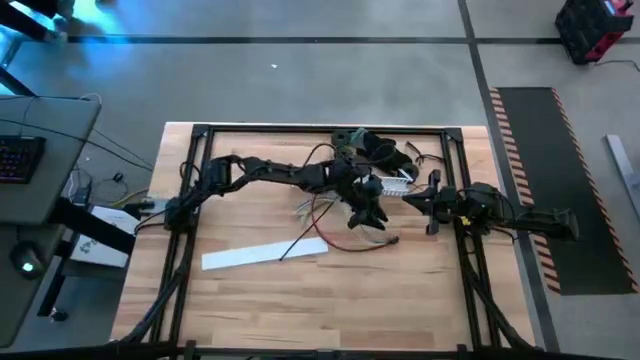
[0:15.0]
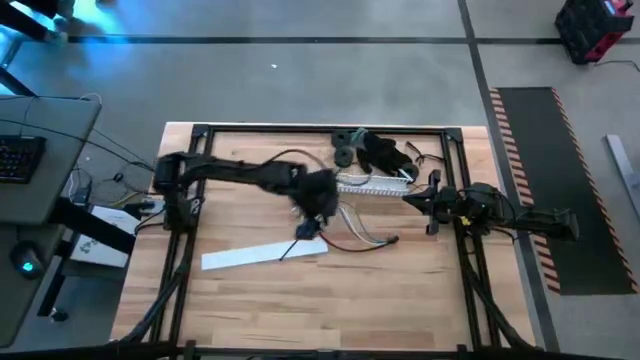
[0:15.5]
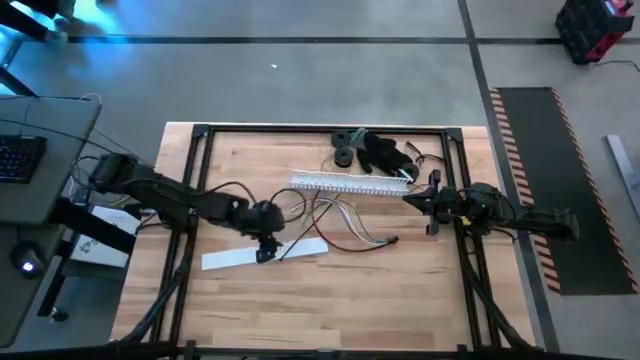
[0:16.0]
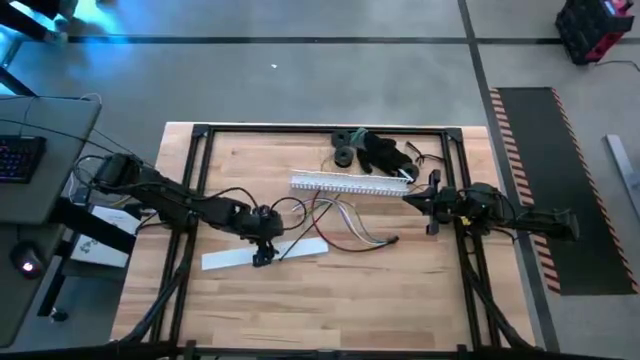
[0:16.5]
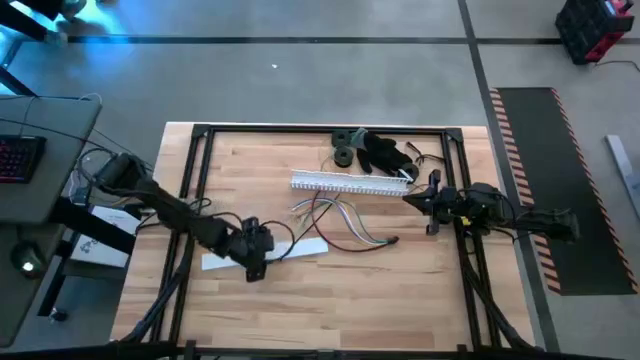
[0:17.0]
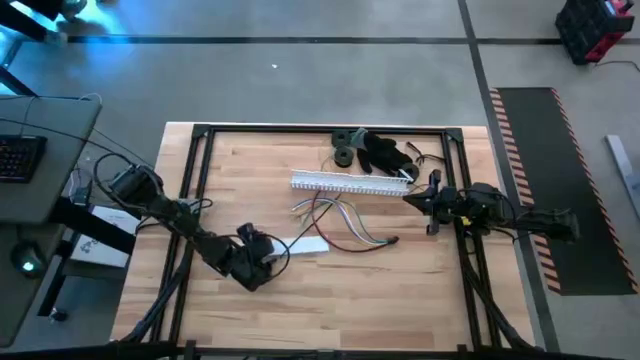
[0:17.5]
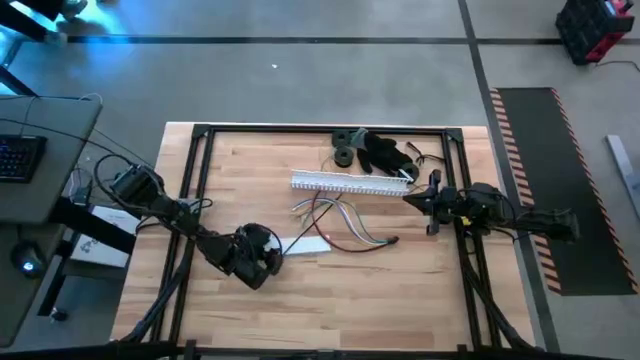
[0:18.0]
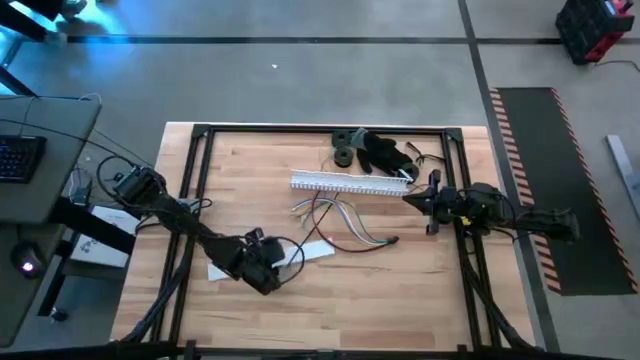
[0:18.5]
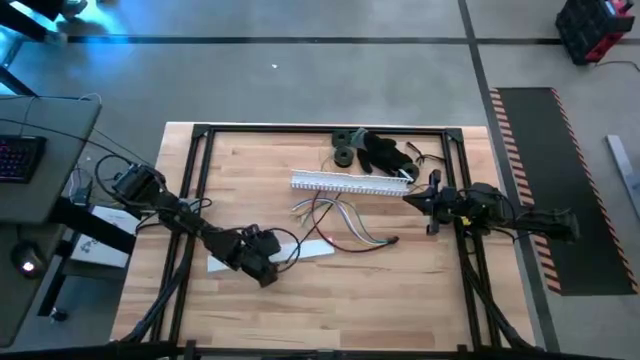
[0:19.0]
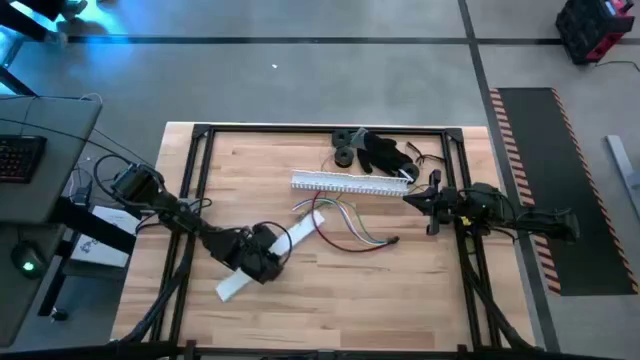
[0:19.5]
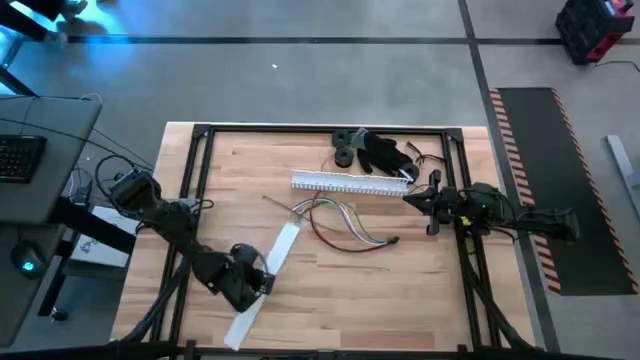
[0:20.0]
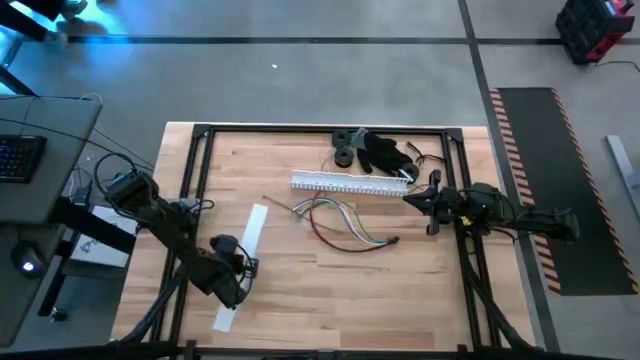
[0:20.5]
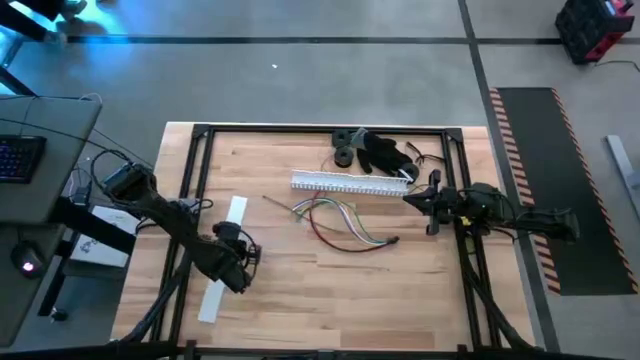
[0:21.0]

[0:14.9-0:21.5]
Task: Ziptie cables
Adjust the cable duct cap

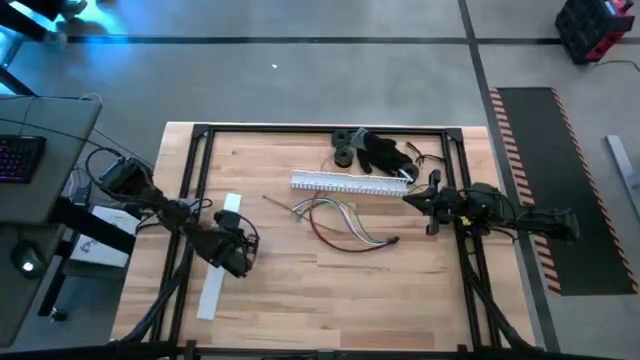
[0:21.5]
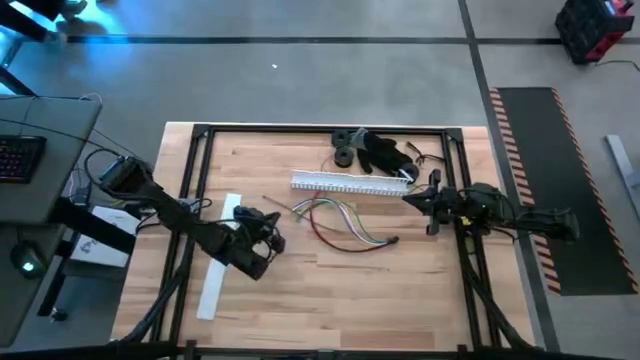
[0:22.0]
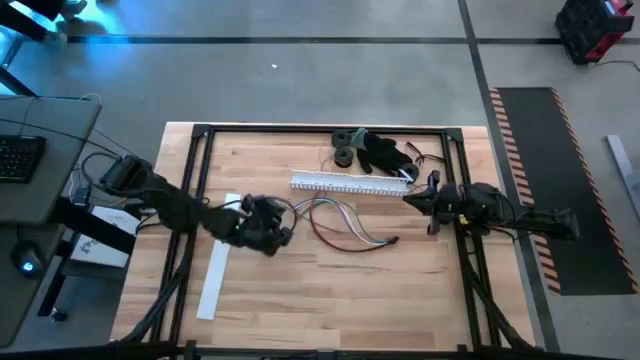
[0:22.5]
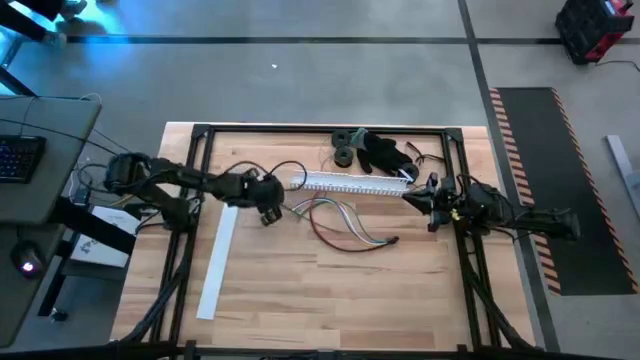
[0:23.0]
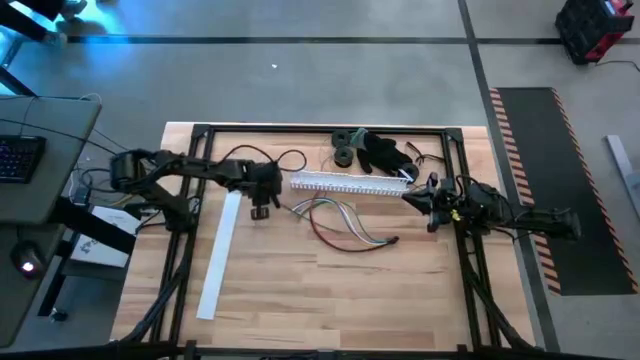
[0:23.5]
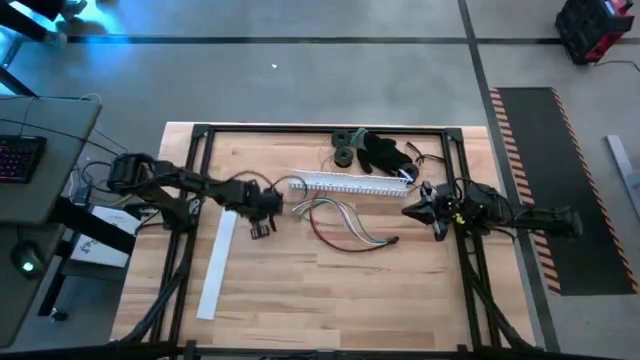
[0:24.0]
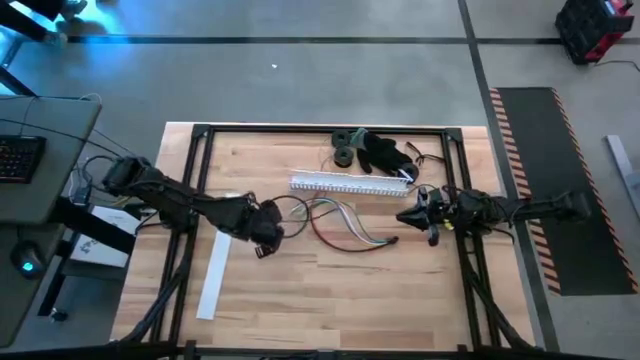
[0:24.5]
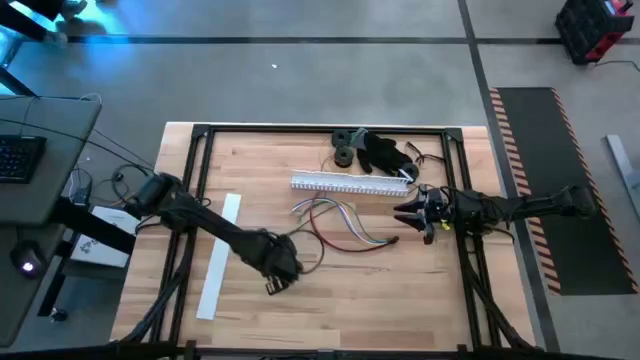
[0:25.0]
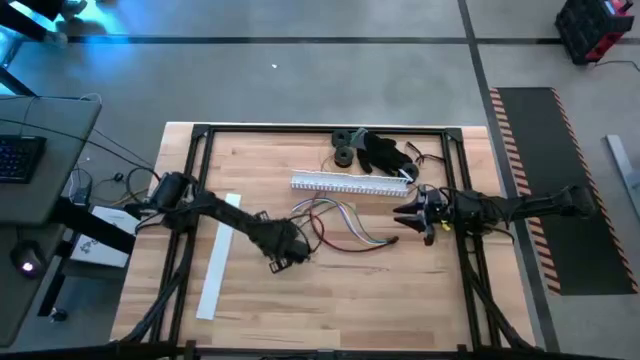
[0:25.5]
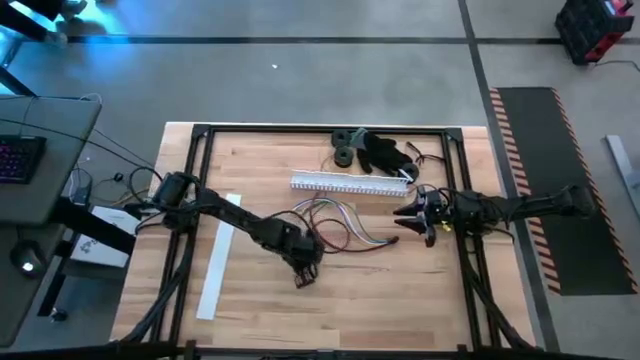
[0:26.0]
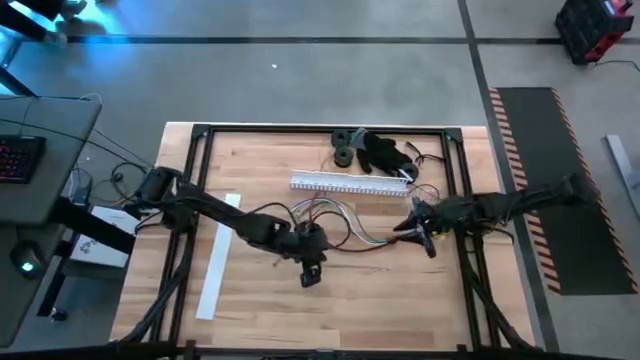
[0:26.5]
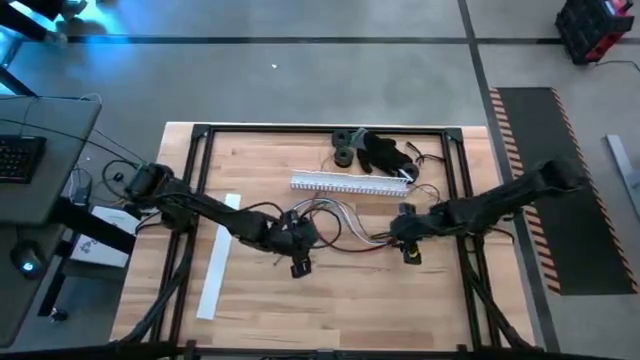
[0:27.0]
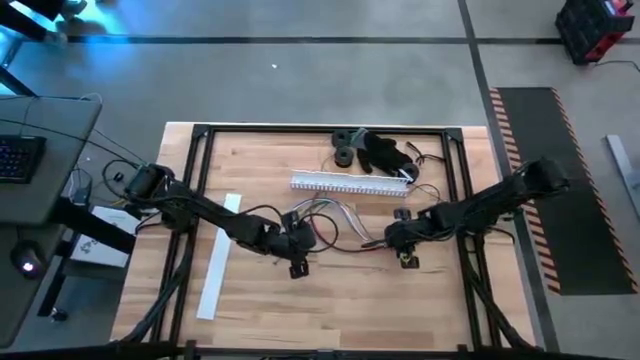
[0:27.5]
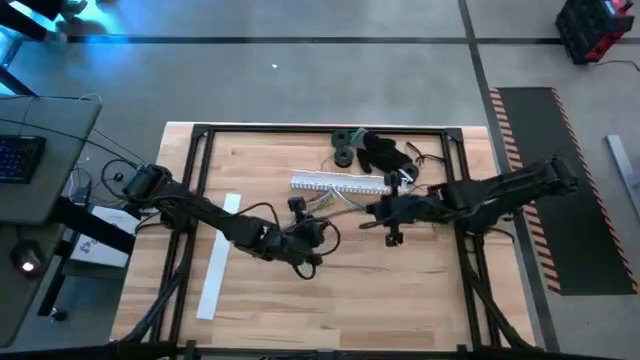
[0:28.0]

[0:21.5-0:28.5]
Wrap the cable wire using a black zip tie

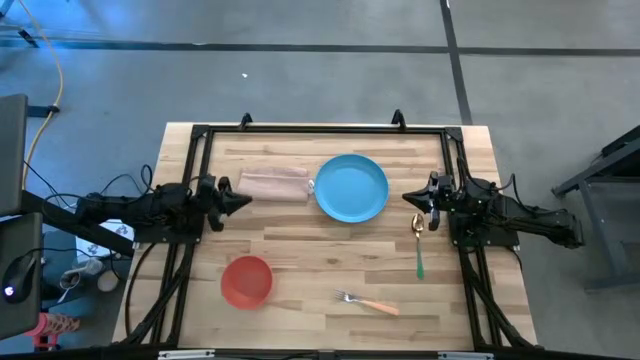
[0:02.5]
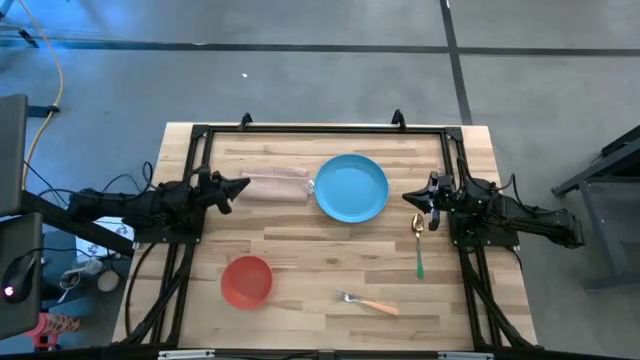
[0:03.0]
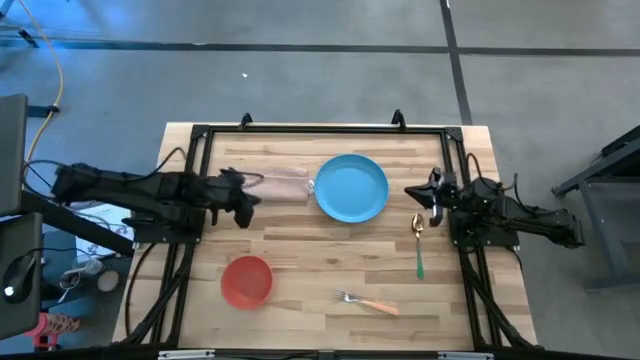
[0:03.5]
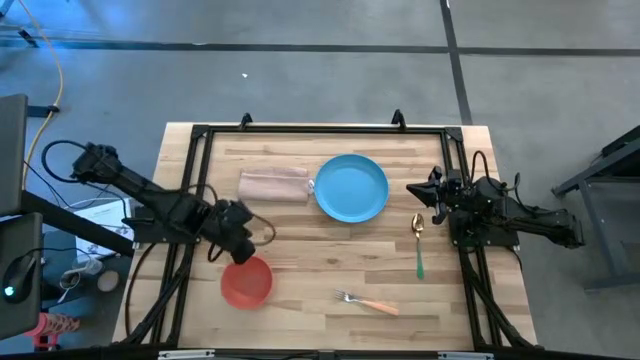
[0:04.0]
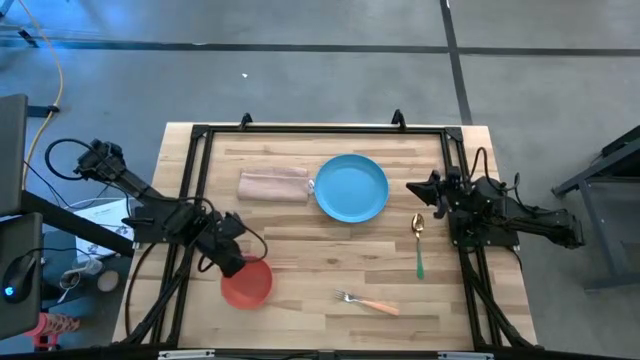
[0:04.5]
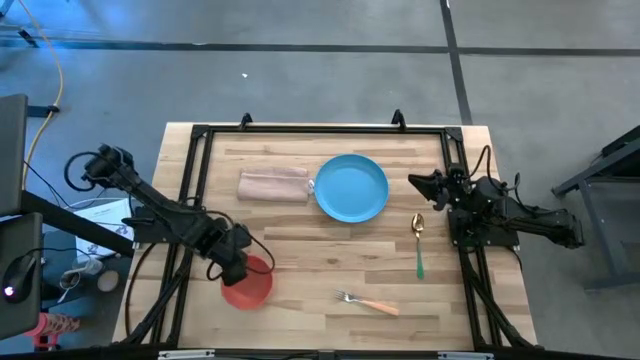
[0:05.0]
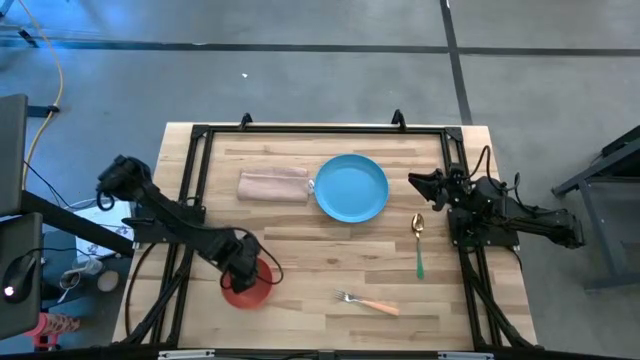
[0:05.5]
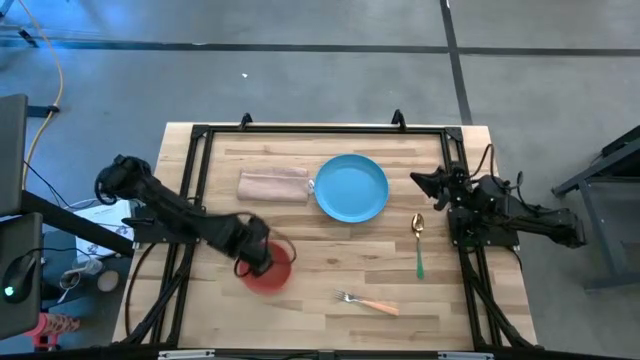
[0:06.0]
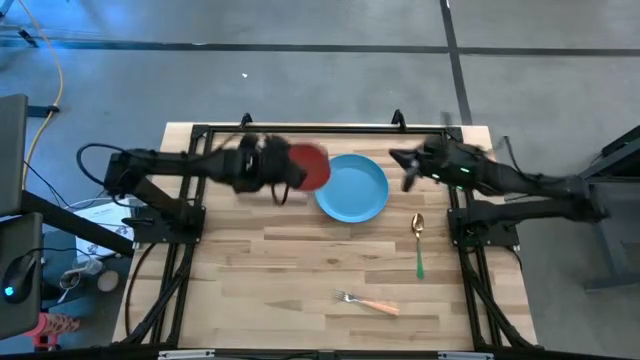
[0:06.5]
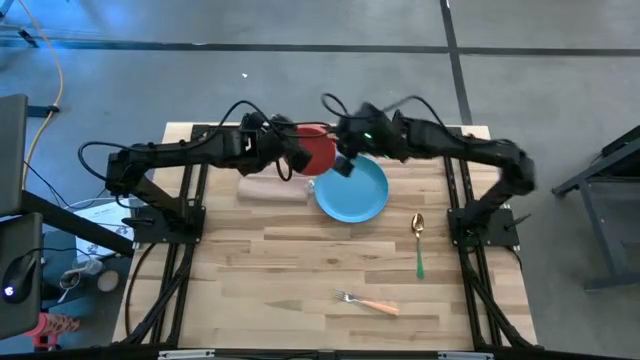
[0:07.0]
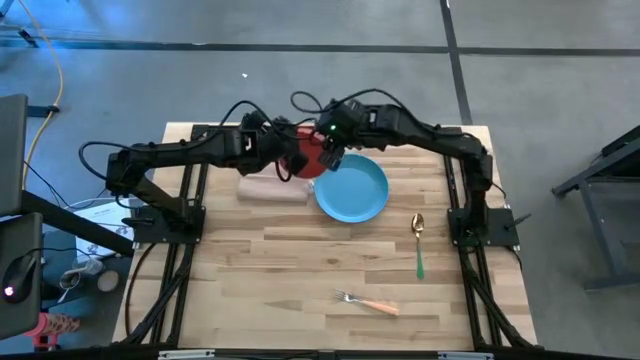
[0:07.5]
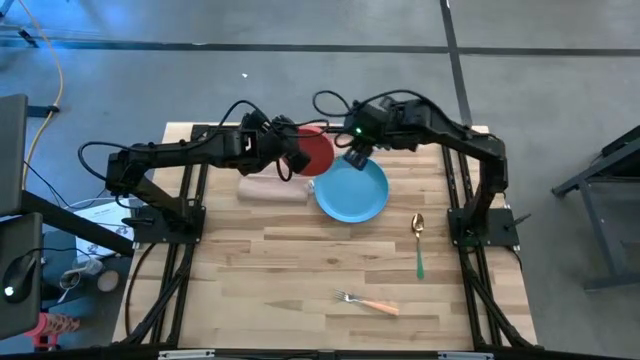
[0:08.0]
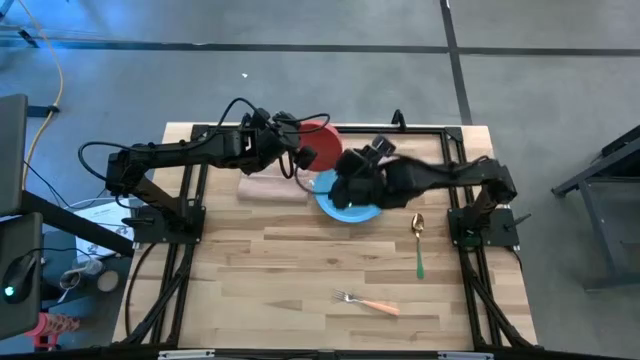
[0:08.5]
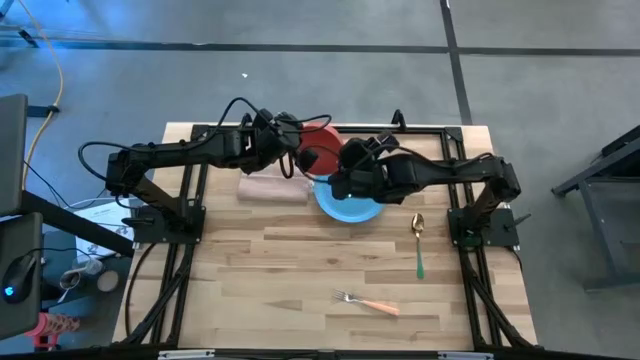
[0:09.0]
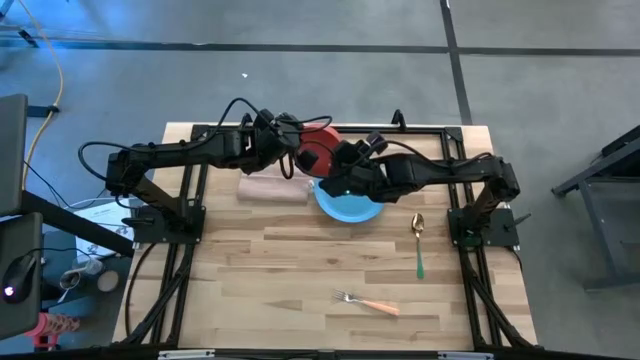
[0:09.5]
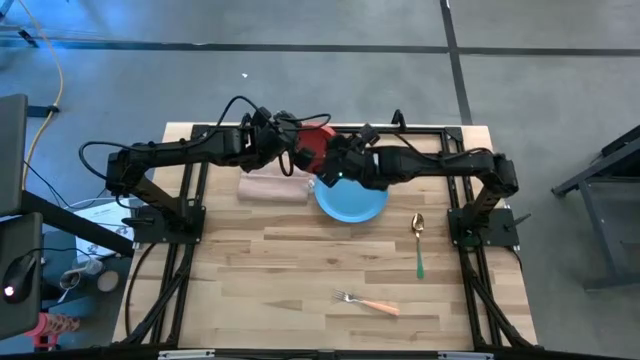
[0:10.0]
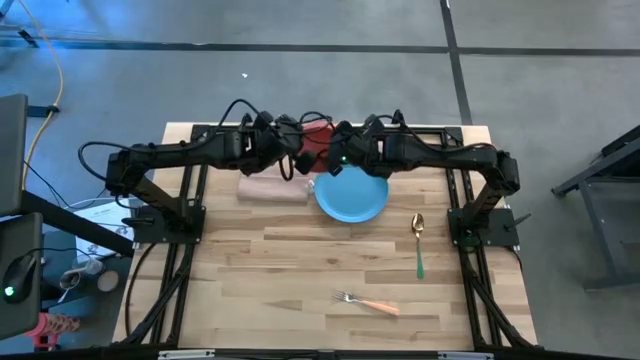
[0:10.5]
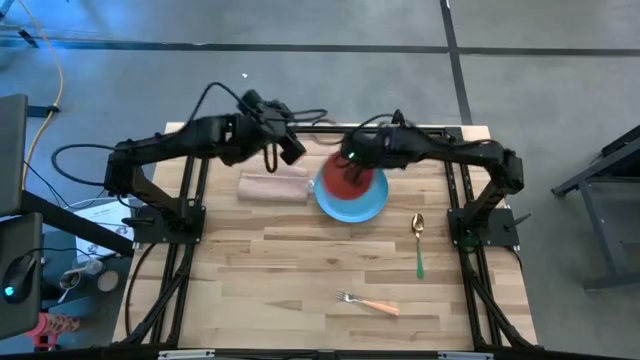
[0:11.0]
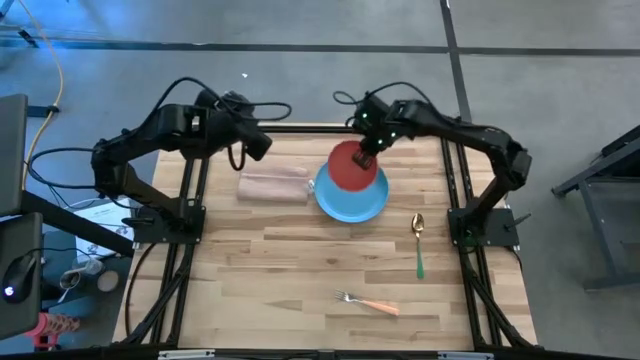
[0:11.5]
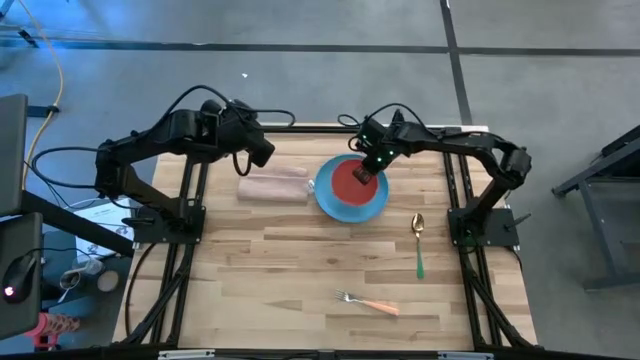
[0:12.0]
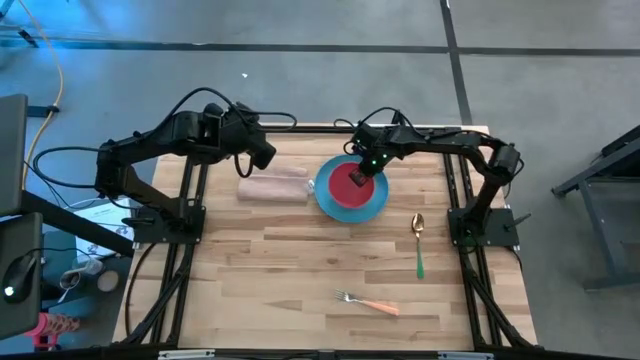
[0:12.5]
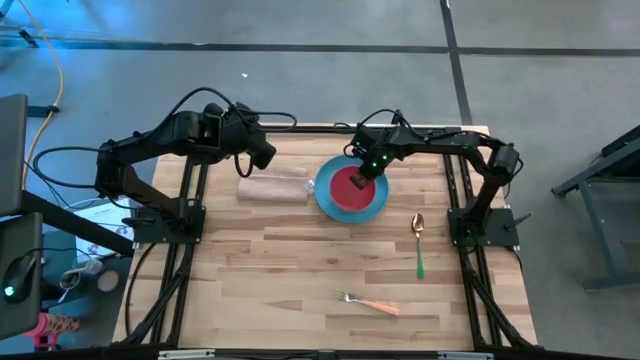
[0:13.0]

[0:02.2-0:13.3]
Task: Set table place
Stack the orange bowl on top of the blue plate
